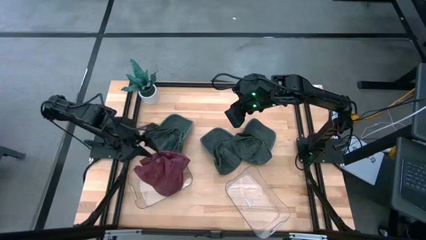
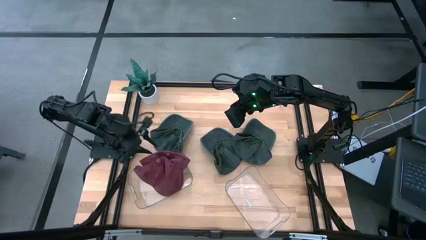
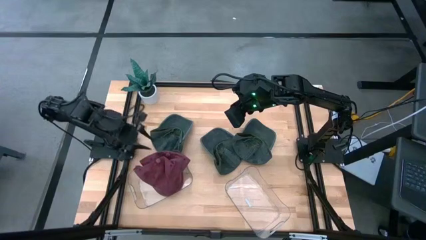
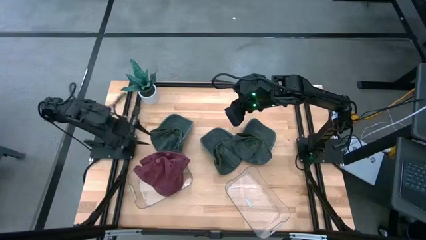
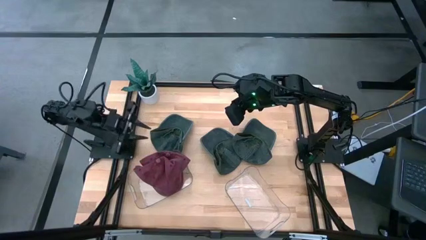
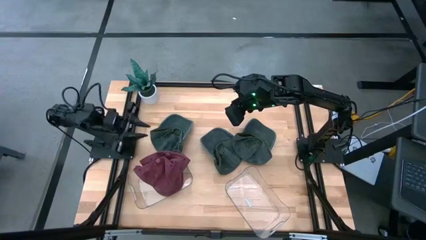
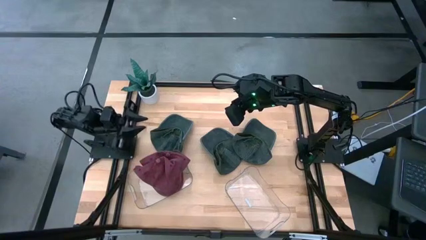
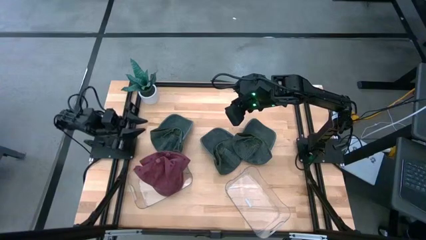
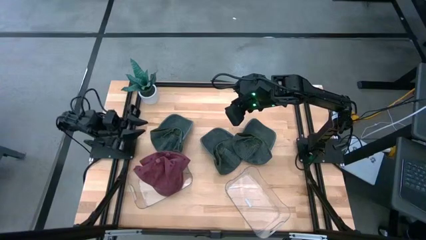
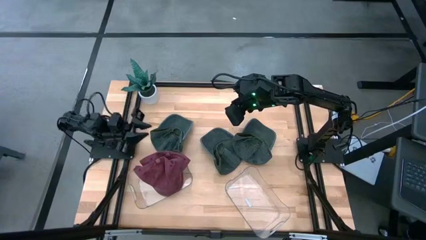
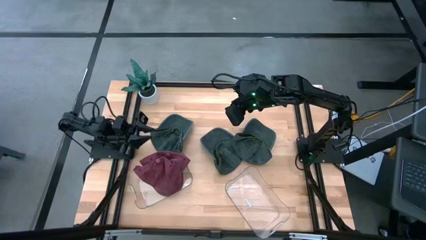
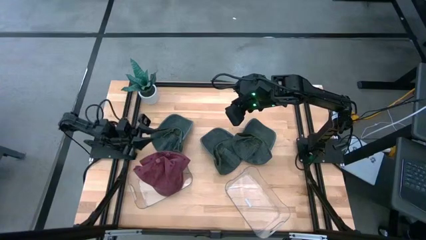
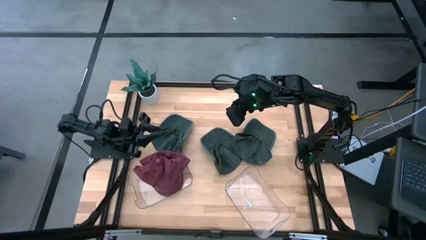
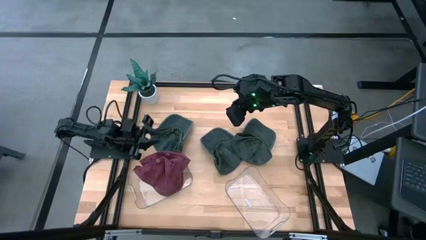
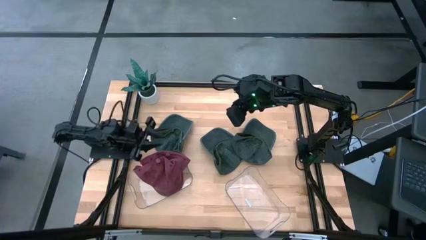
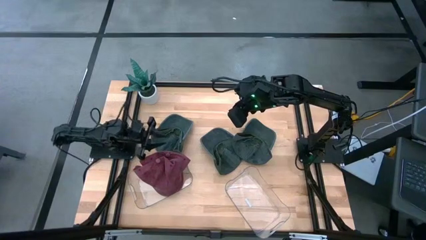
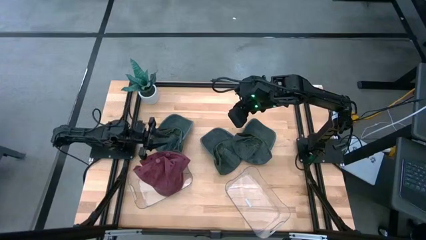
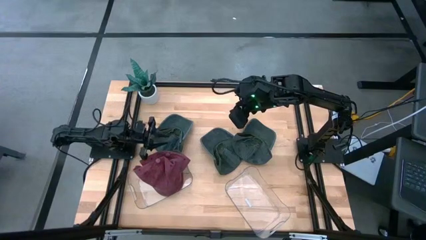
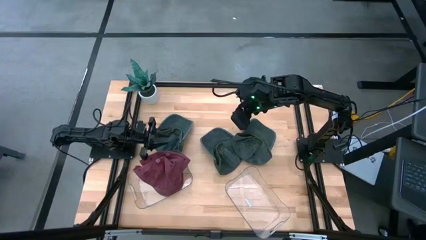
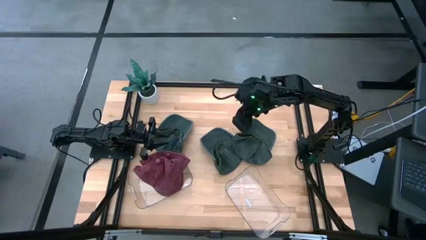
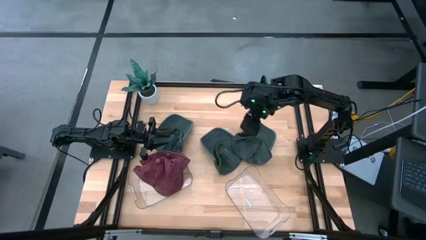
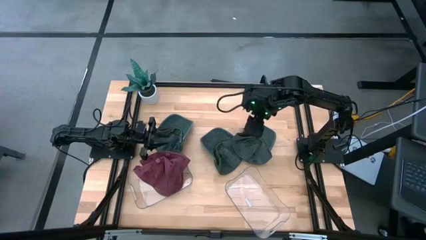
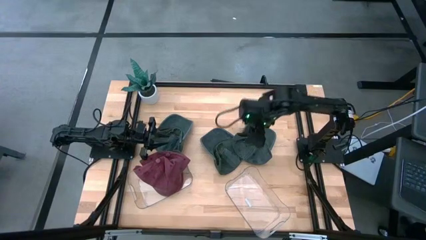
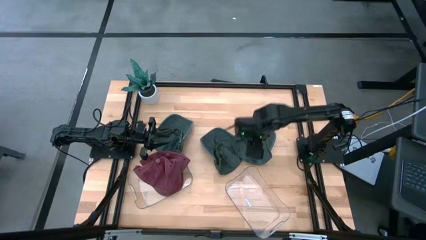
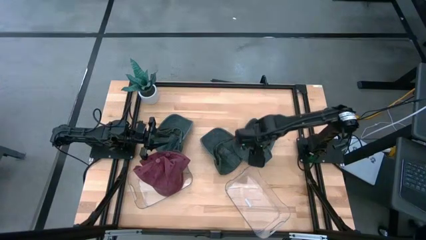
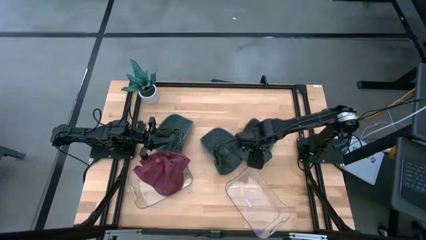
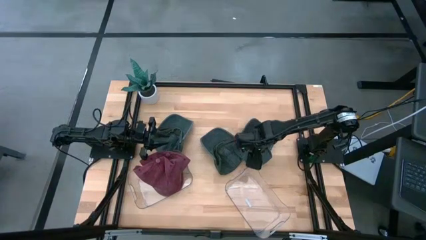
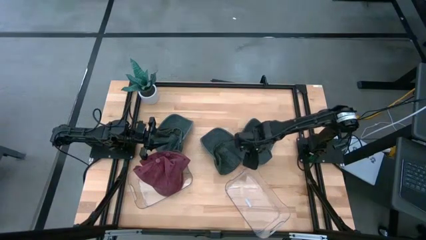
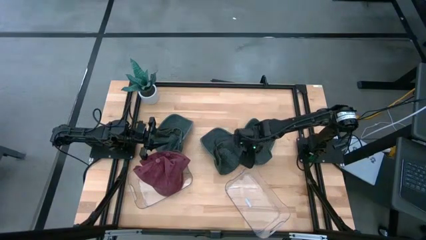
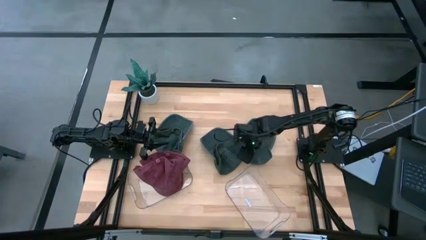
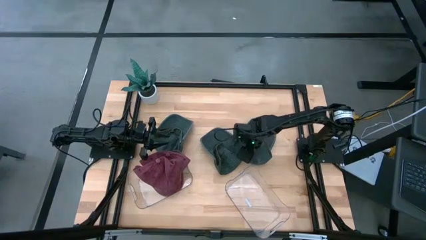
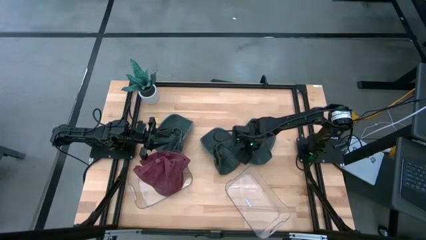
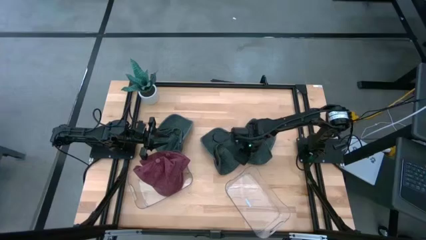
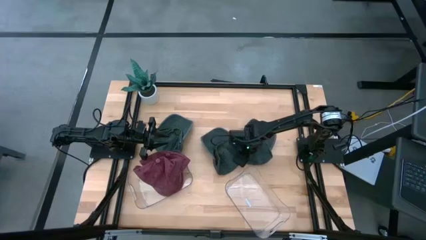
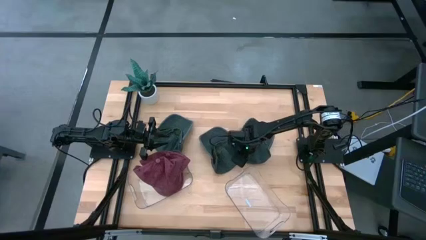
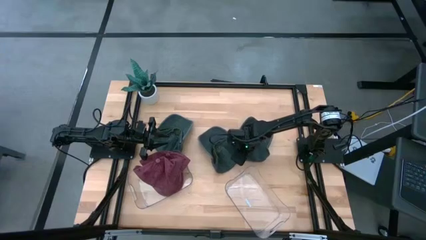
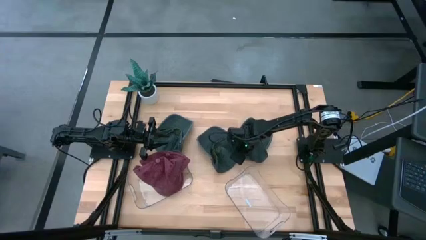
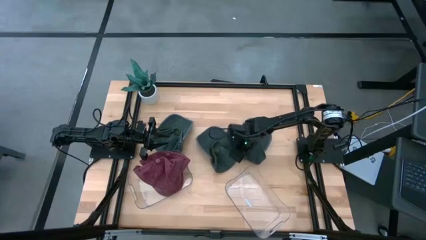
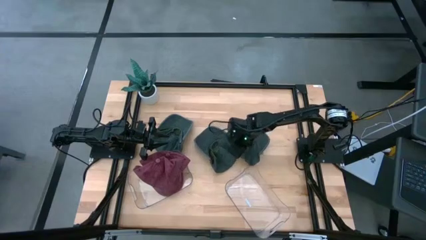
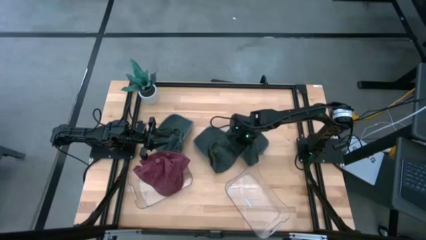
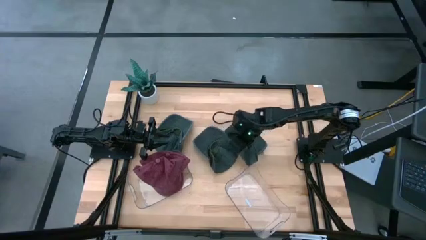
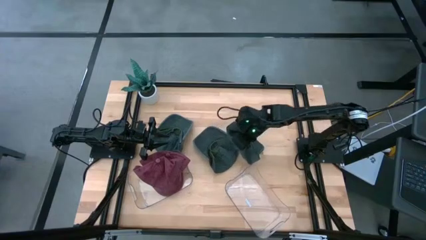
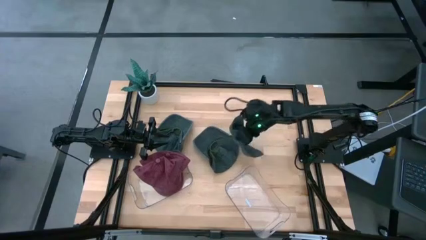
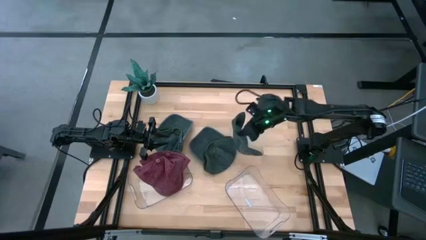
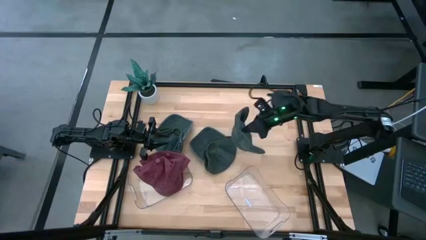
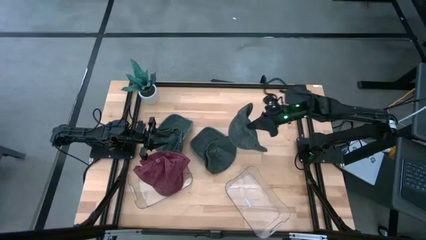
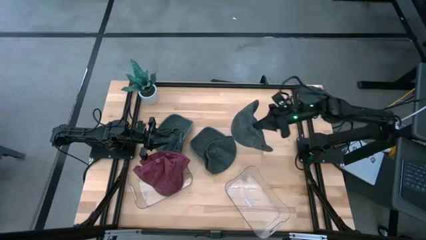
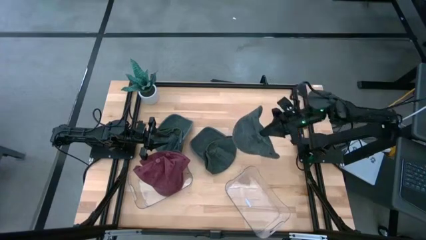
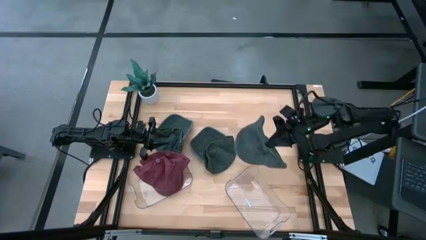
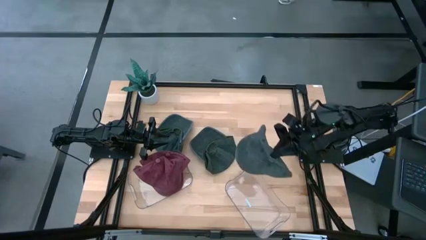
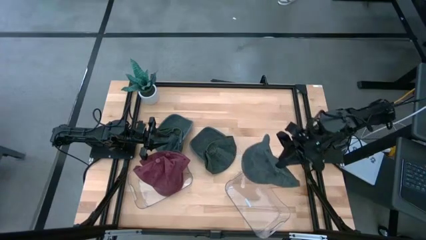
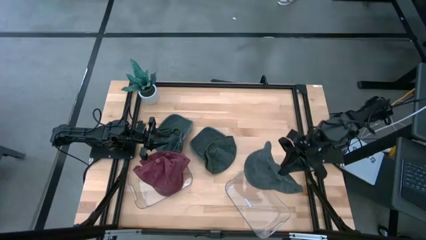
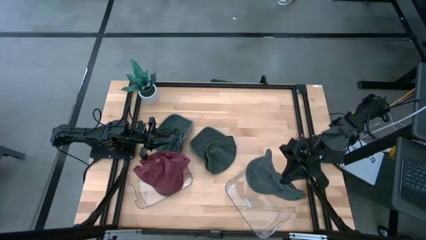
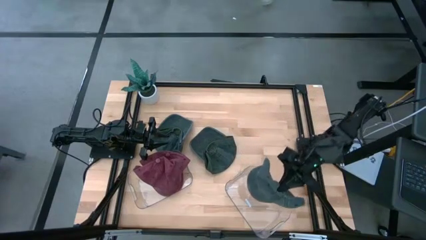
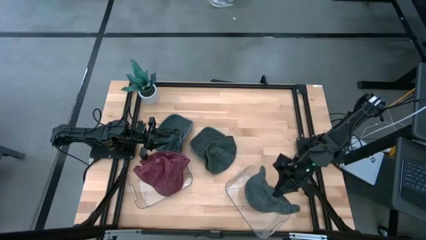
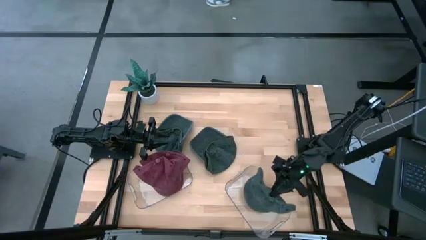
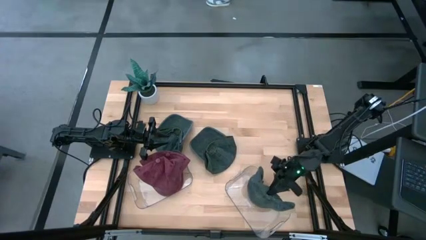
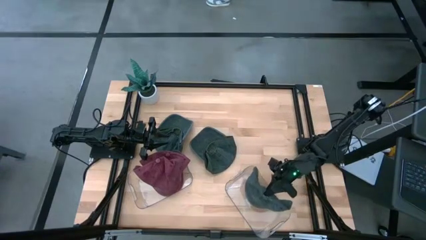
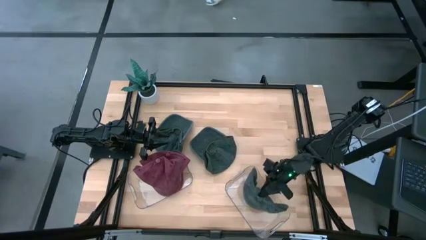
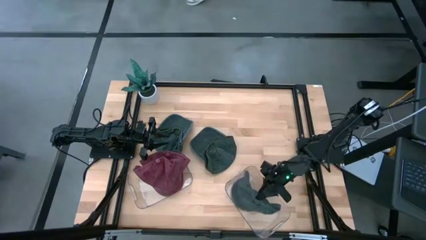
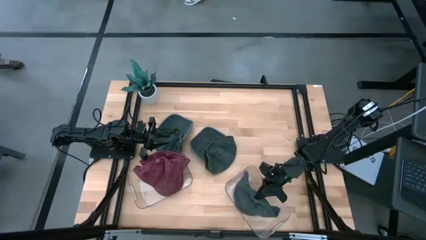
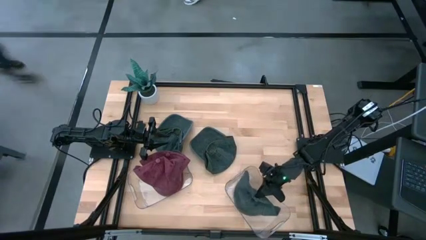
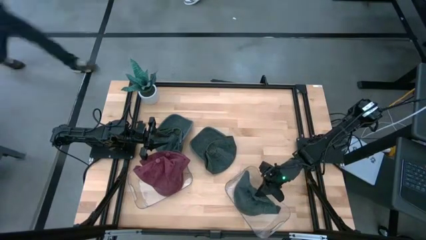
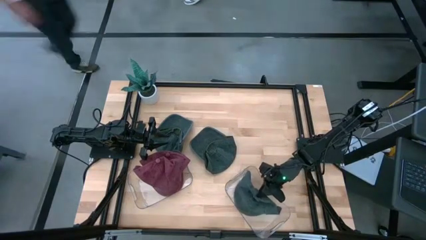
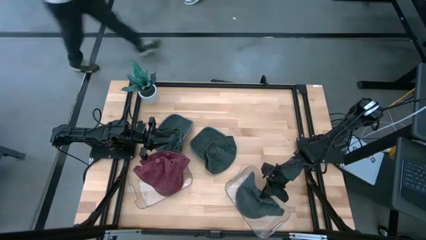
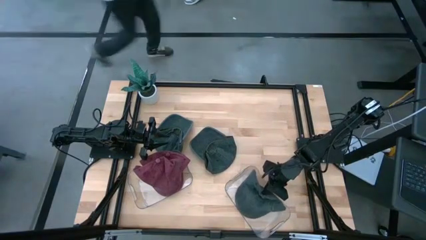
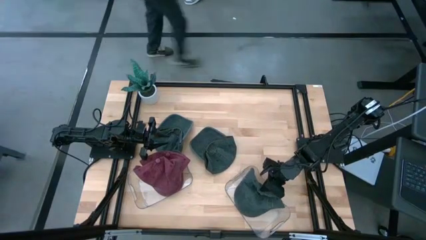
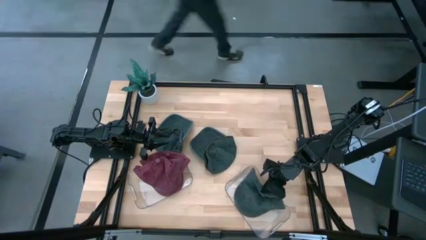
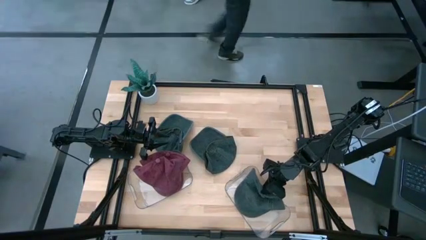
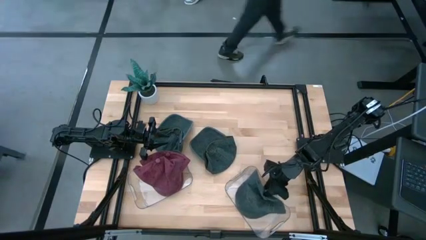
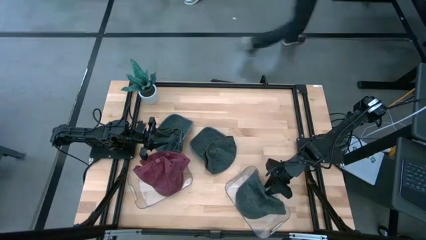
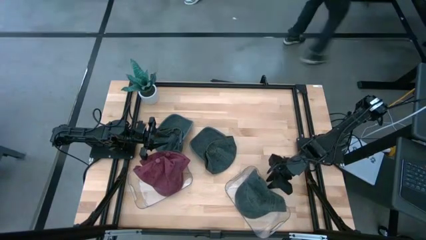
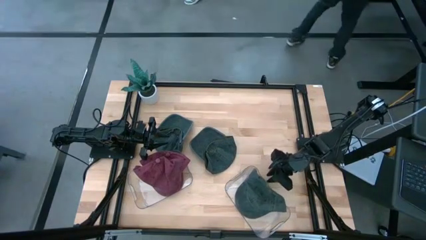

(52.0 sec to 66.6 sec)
Task: Pick & Place hat
Put the right black cap into the right transparent bin
